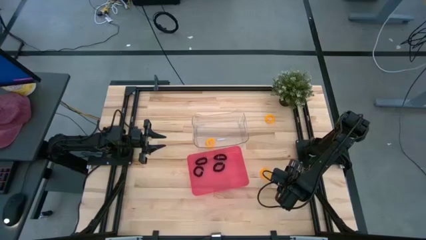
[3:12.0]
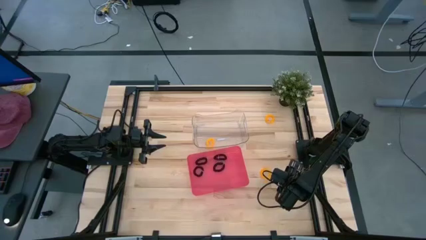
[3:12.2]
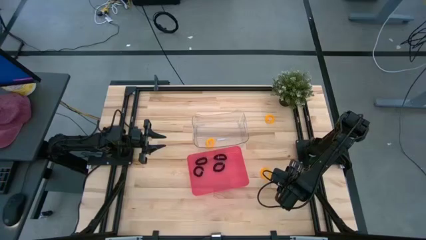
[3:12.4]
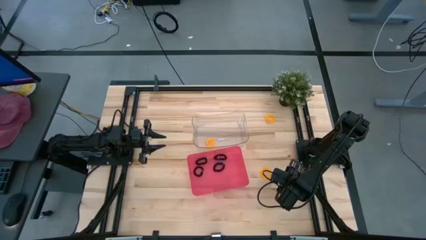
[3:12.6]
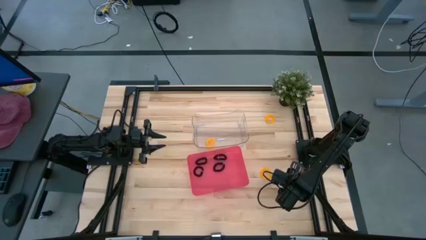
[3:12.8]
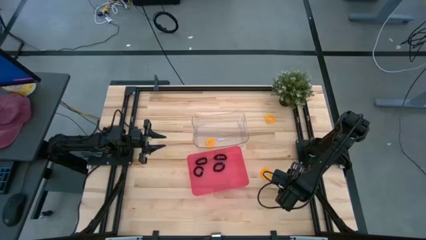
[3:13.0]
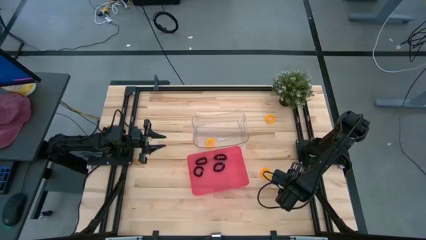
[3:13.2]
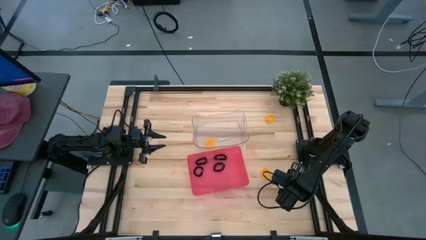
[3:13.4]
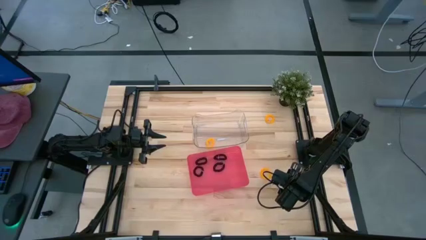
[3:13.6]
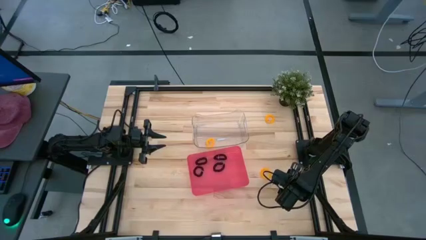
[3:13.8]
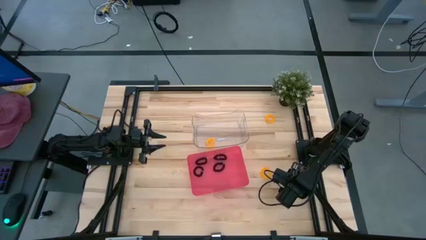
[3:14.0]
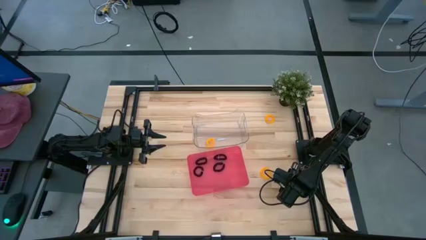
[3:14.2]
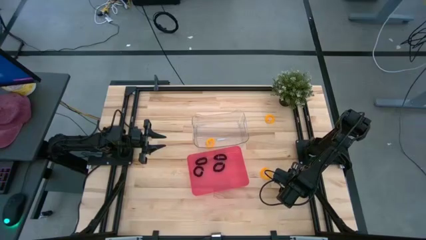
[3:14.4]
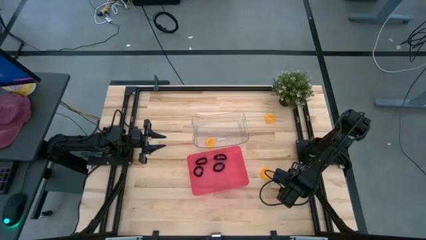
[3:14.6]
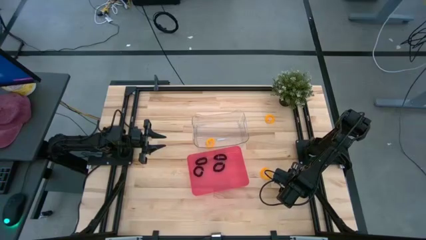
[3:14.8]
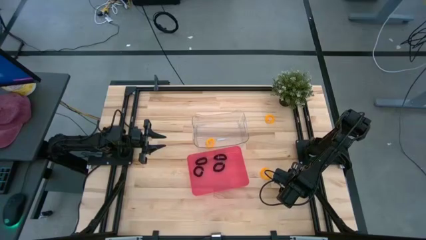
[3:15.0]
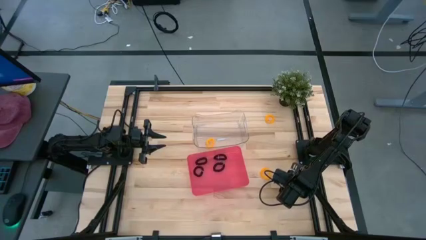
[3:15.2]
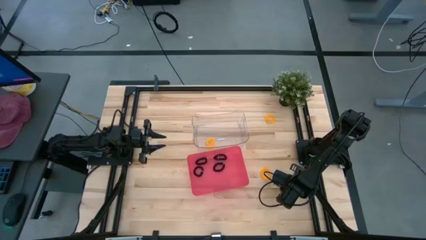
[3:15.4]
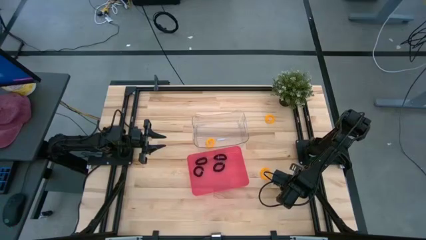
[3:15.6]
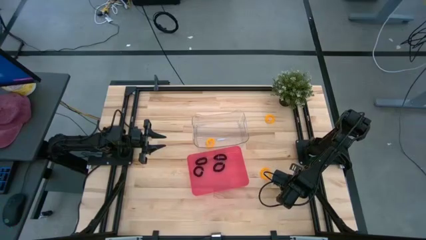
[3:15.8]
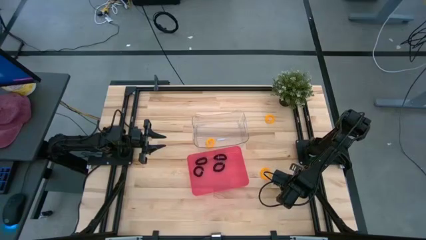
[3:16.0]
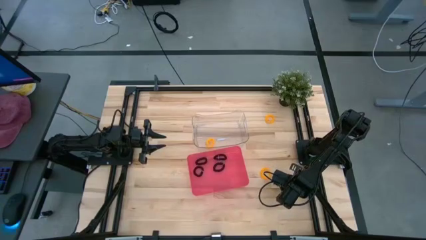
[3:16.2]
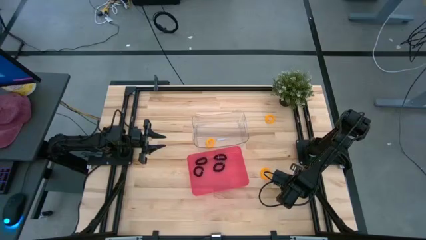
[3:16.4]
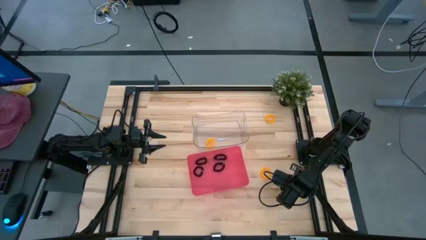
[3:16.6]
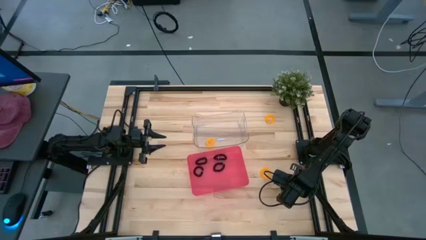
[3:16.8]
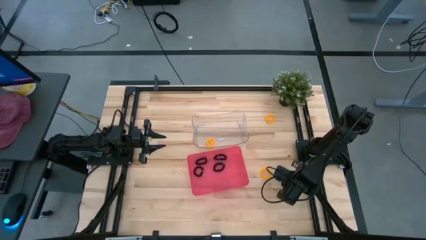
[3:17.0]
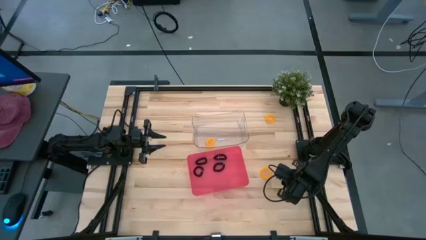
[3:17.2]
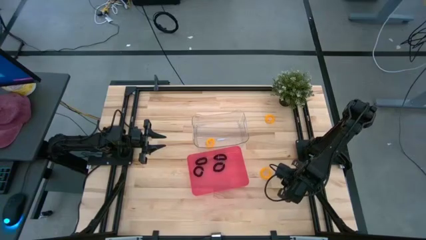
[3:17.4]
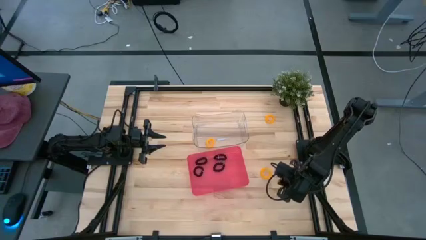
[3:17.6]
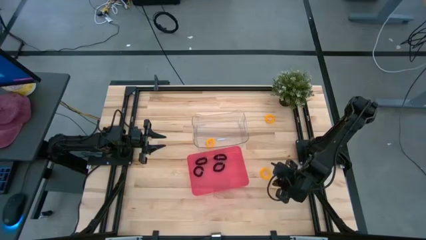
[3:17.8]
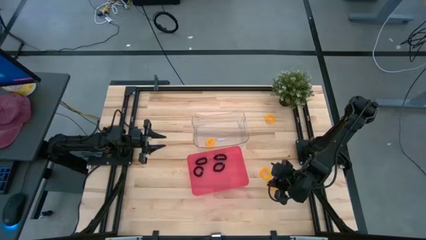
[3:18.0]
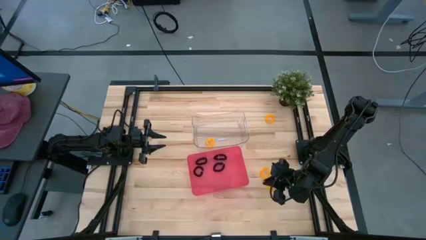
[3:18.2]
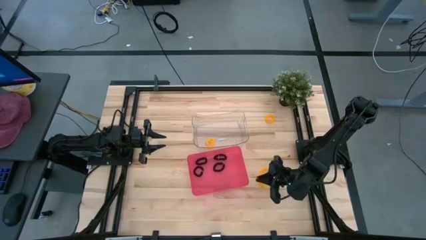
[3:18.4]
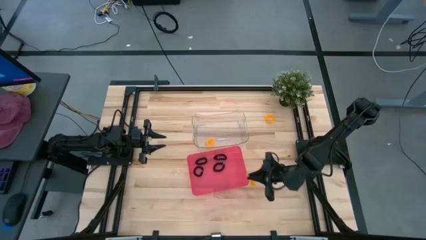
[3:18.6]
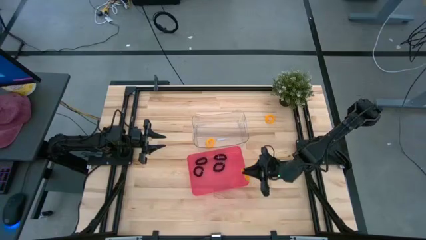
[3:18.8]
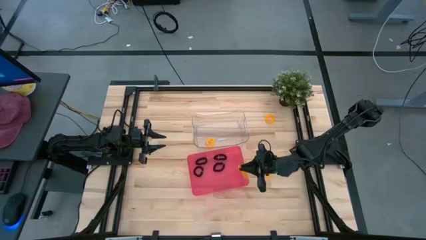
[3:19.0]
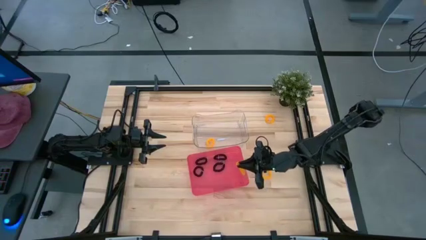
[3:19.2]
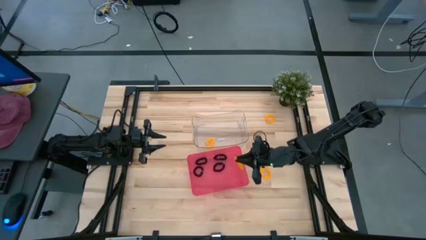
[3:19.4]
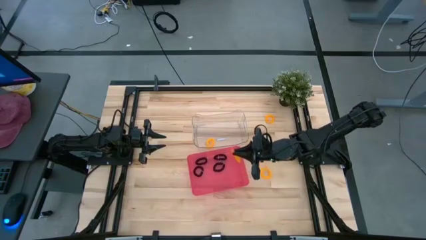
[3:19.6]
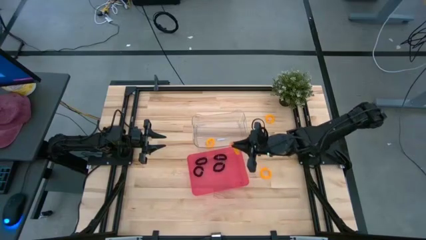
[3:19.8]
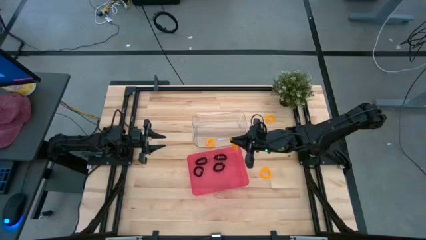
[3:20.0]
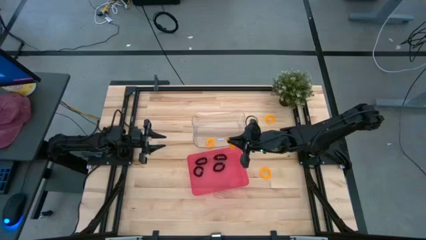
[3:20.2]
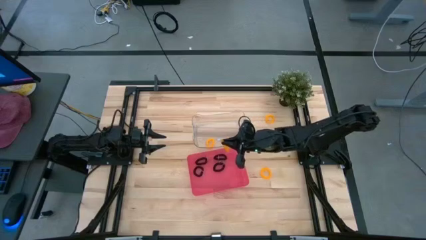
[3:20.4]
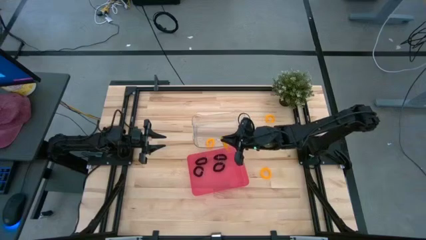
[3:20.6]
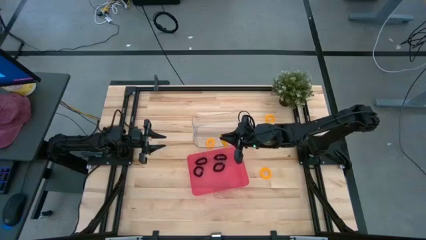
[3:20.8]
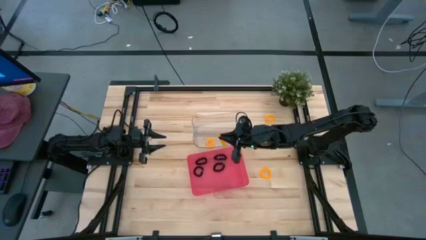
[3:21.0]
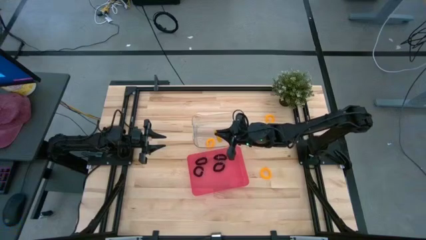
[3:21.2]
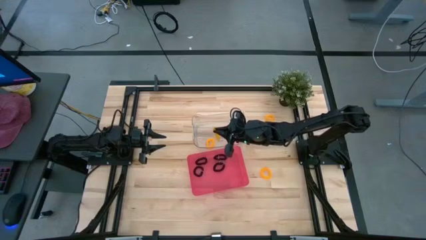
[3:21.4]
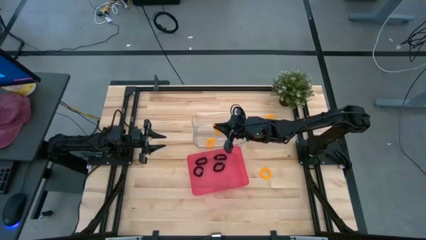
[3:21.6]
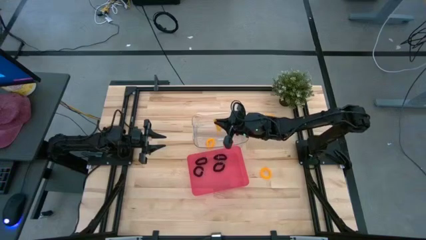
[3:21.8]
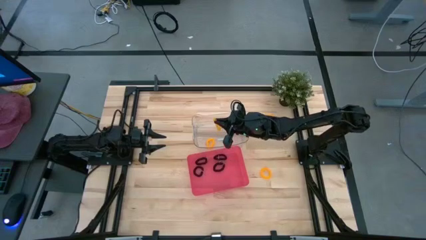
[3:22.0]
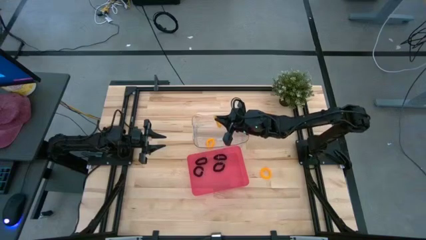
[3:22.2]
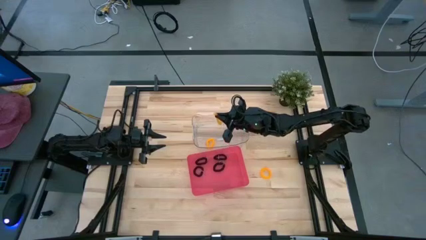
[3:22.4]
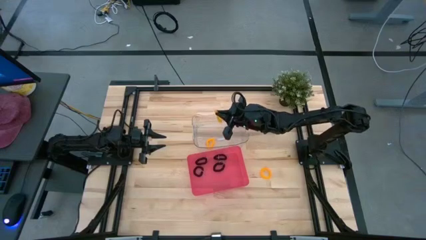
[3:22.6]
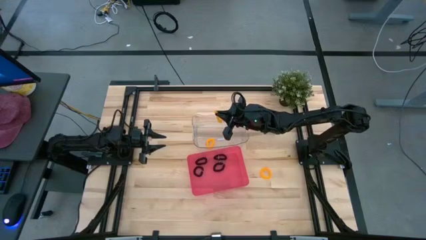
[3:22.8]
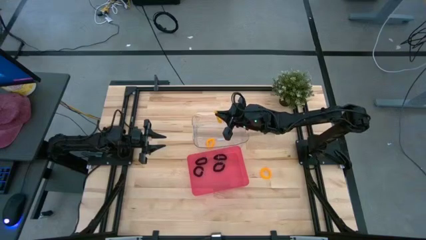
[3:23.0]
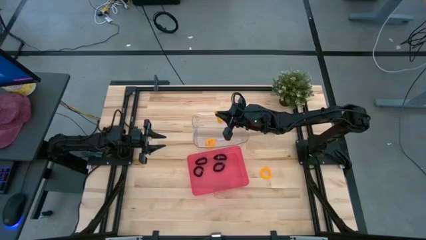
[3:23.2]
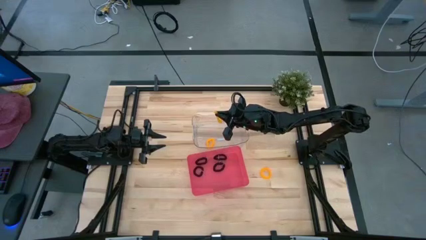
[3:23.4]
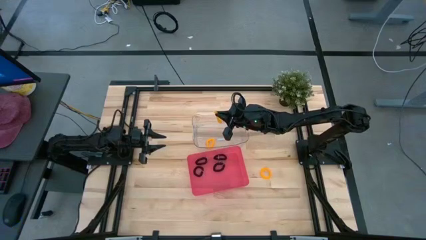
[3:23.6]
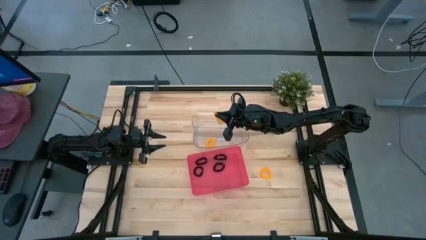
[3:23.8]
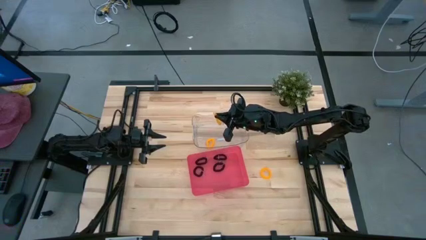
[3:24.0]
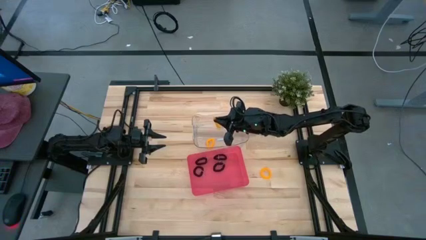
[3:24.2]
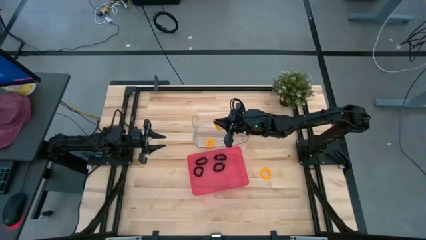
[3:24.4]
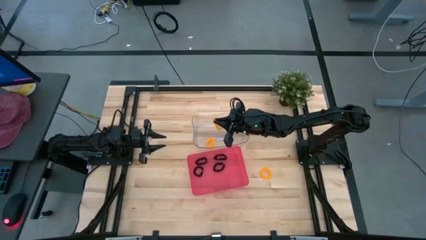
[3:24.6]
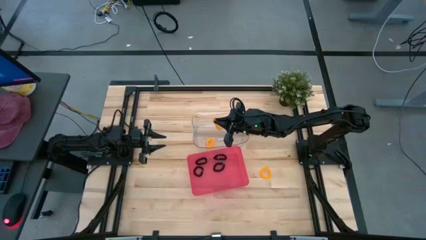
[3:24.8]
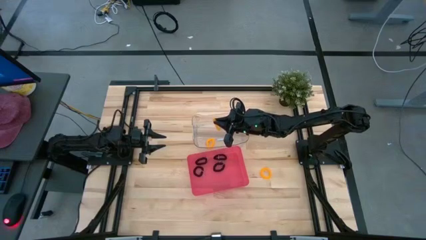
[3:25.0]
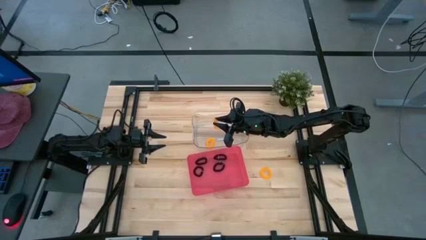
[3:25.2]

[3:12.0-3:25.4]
Task: Sort spring keychains
Put the bottom yellow spring keychain into the transparent bin

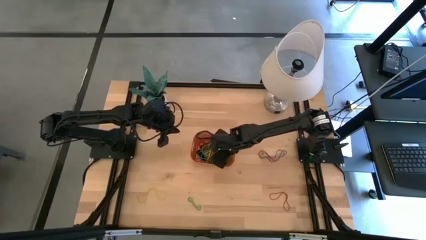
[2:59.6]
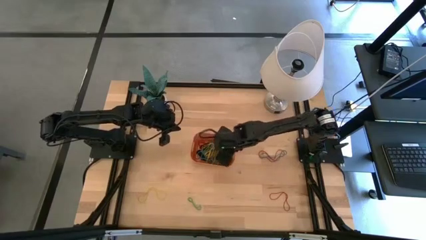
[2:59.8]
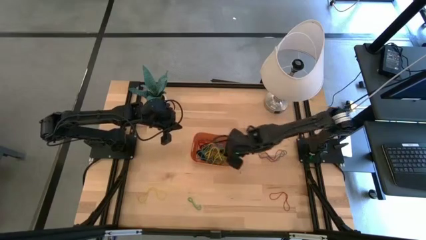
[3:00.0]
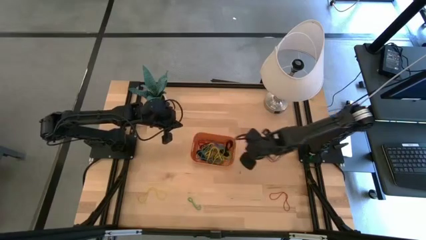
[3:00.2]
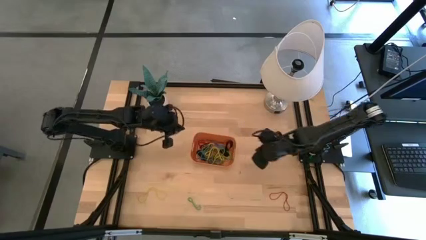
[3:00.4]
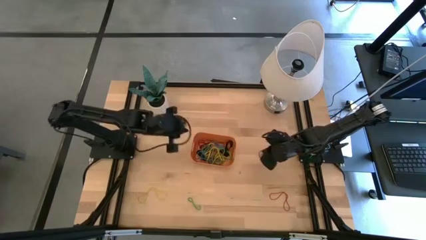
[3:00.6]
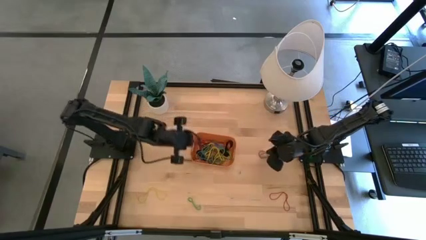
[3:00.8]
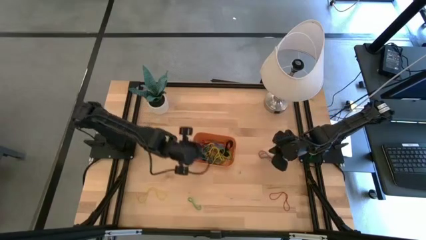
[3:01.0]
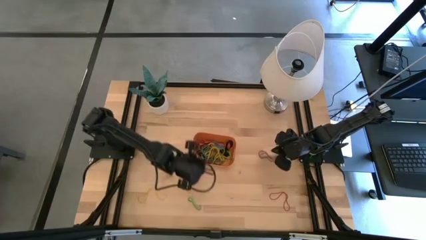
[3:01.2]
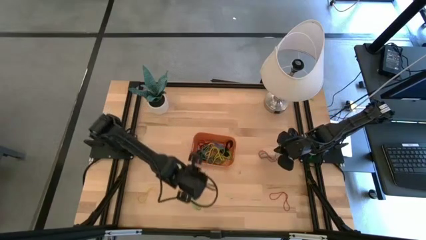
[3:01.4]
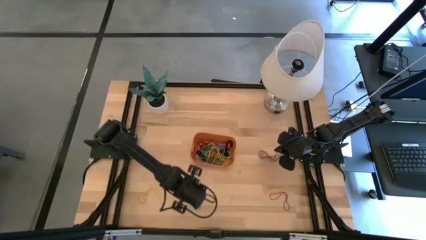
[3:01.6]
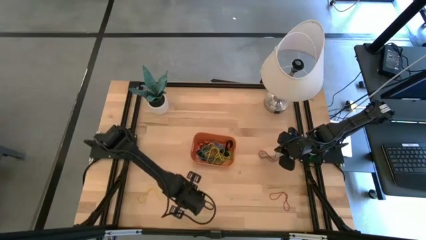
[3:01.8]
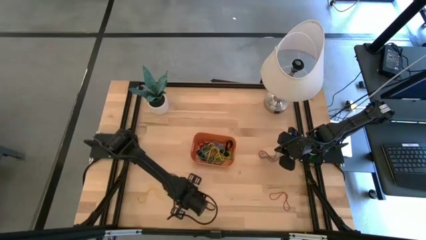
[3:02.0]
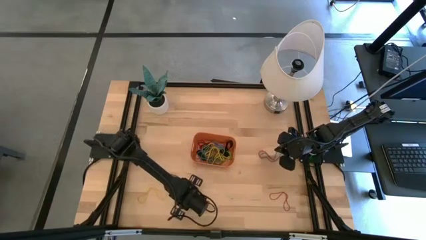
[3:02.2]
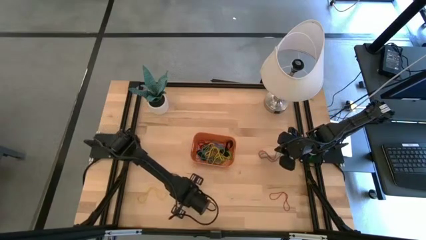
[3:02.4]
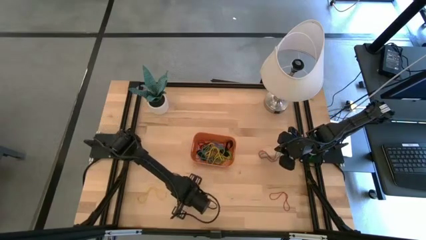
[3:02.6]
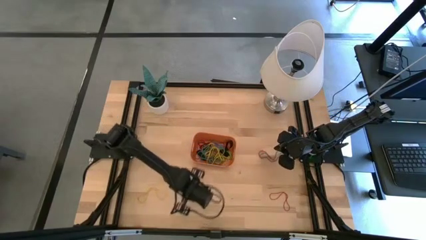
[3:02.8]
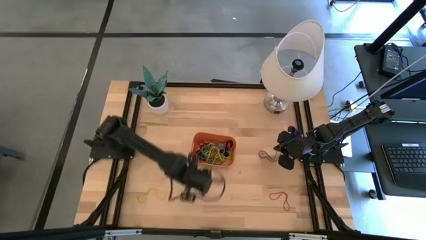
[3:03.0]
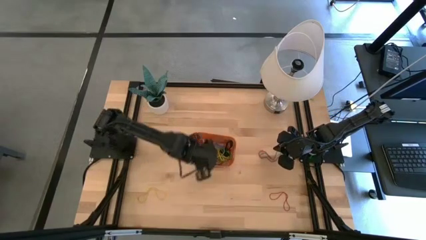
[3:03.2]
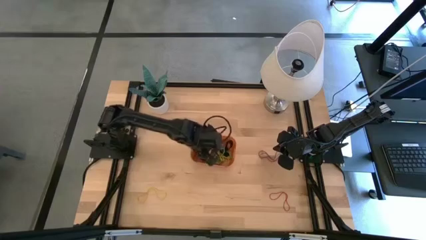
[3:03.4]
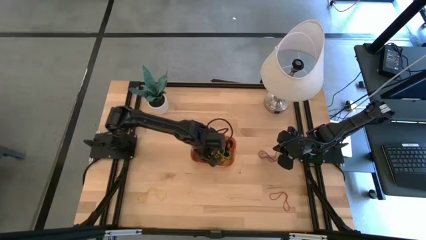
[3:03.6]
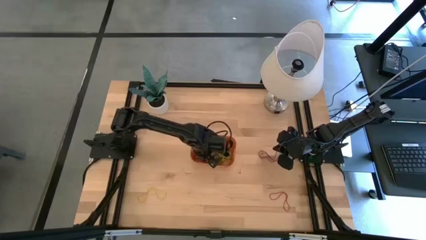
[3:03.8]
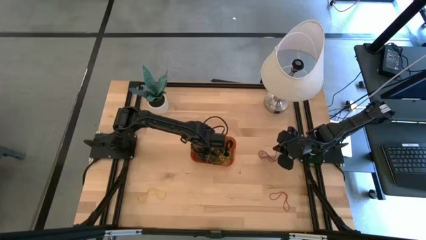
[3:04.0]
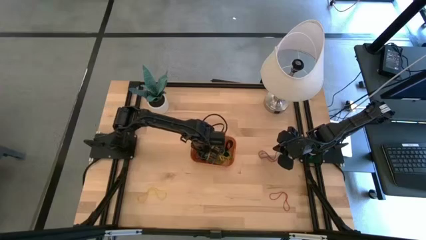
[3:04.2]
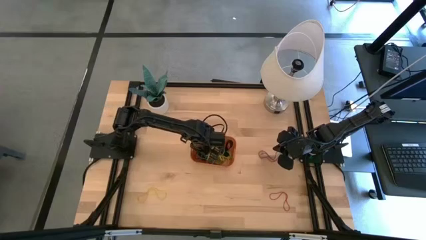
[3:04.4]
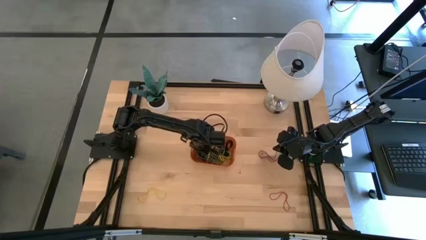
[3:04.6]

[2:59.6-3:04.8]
Task: Pick and place rubber bands into bin
Put the green rubber band into the orange bin
